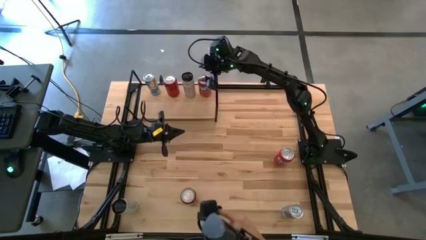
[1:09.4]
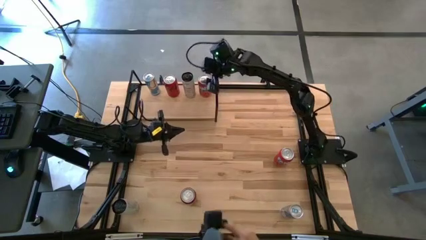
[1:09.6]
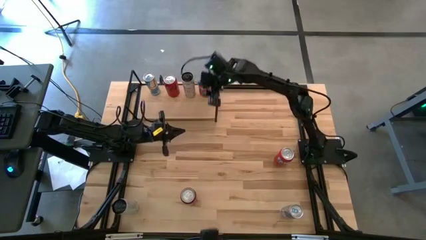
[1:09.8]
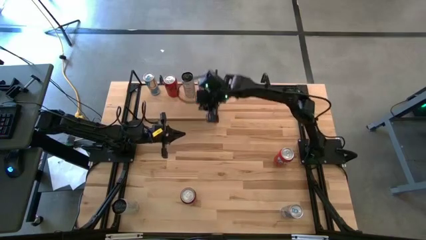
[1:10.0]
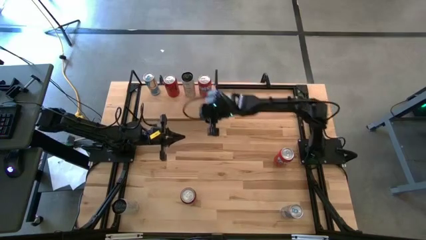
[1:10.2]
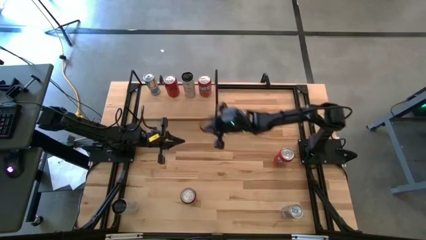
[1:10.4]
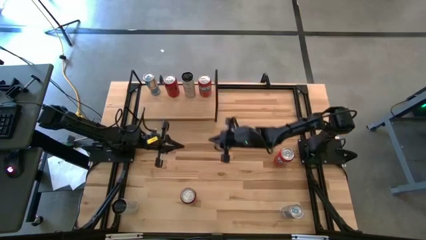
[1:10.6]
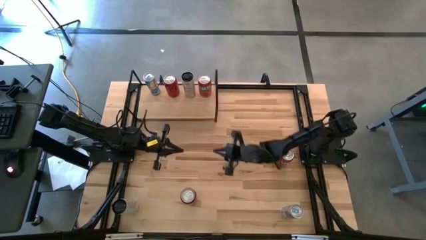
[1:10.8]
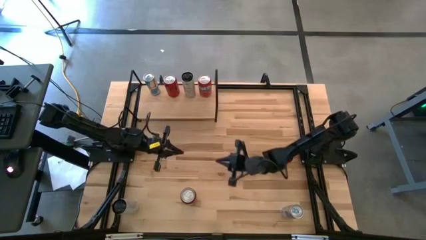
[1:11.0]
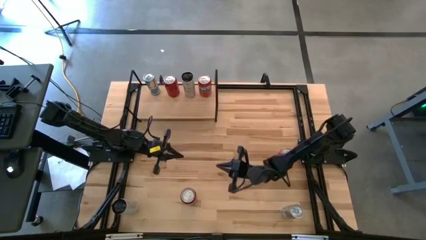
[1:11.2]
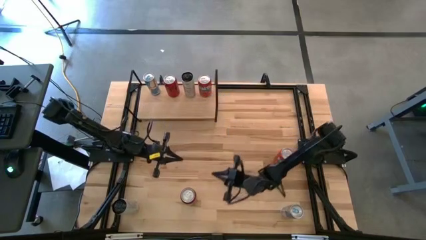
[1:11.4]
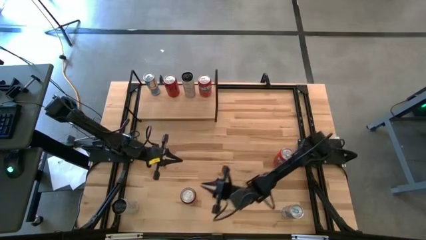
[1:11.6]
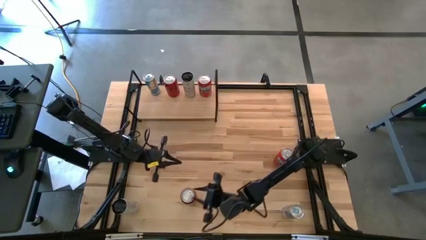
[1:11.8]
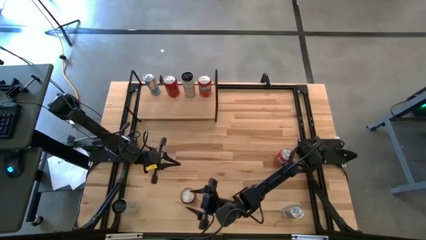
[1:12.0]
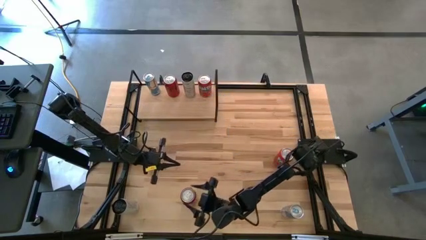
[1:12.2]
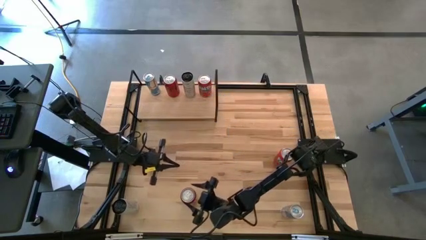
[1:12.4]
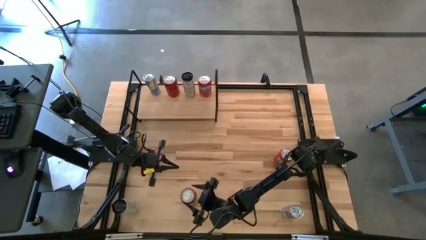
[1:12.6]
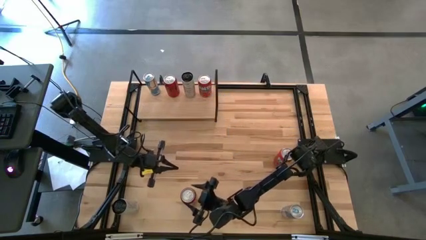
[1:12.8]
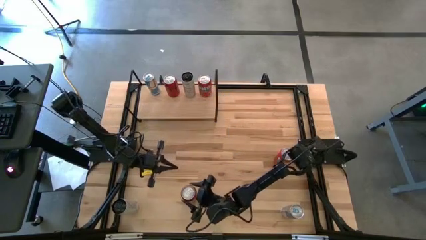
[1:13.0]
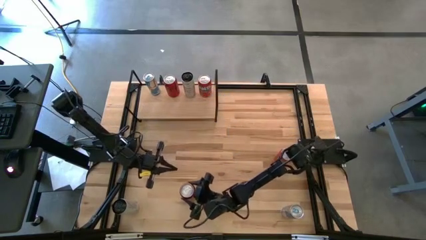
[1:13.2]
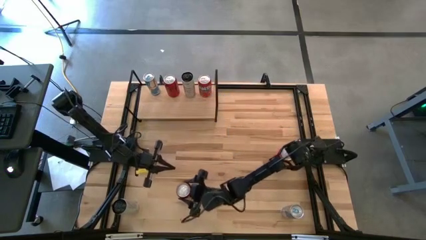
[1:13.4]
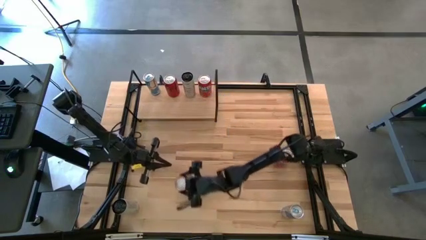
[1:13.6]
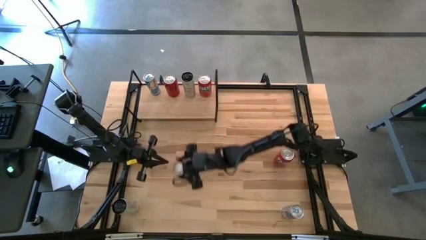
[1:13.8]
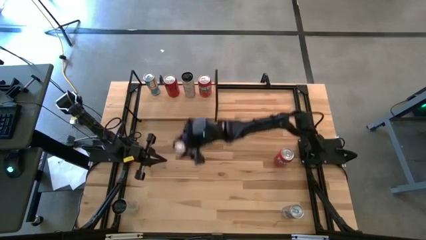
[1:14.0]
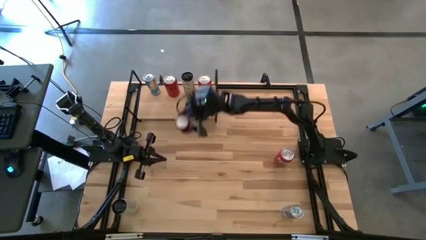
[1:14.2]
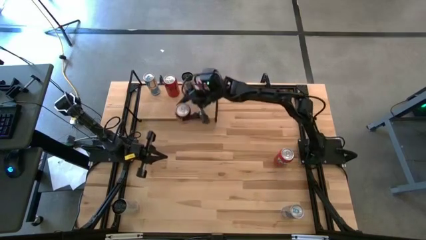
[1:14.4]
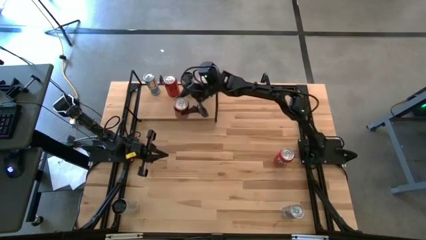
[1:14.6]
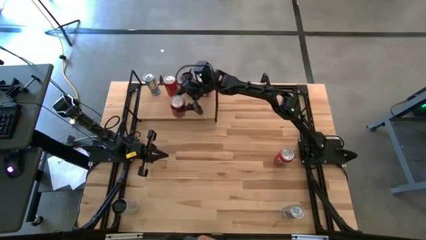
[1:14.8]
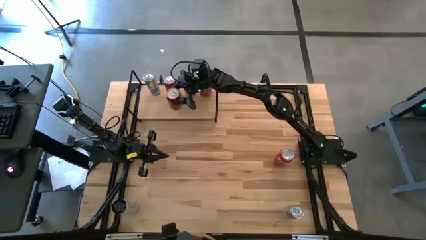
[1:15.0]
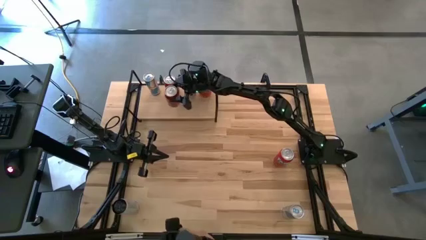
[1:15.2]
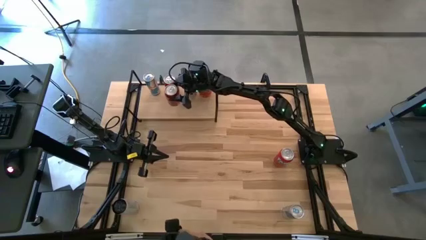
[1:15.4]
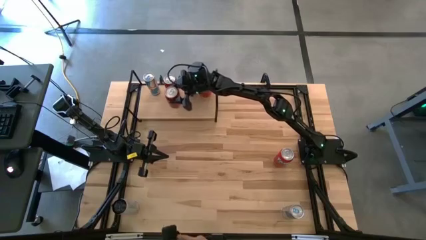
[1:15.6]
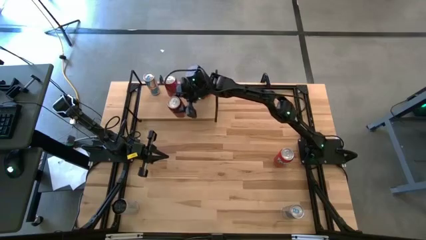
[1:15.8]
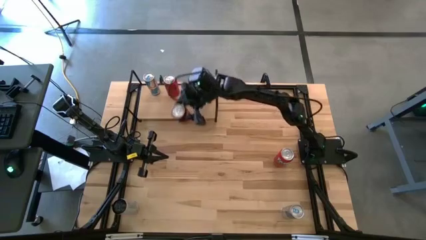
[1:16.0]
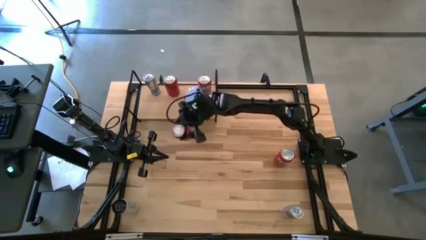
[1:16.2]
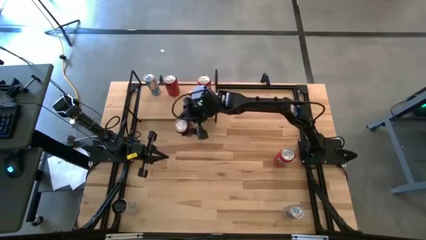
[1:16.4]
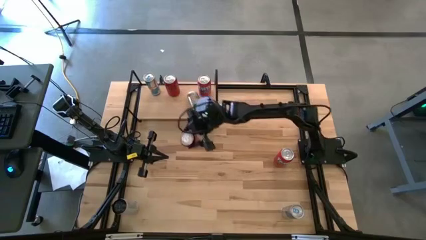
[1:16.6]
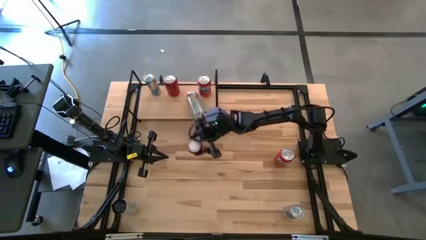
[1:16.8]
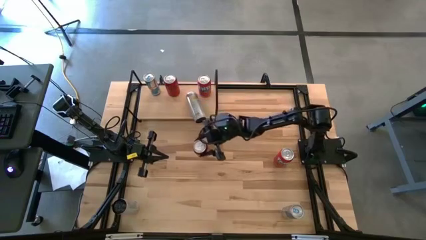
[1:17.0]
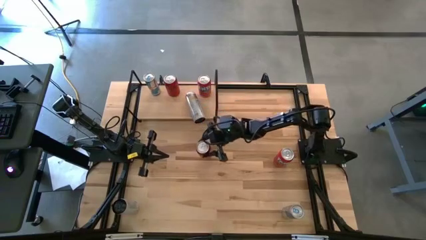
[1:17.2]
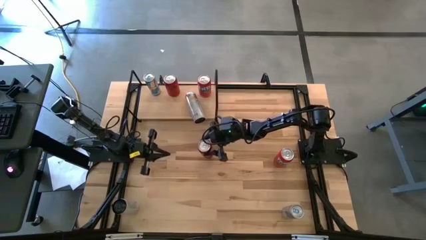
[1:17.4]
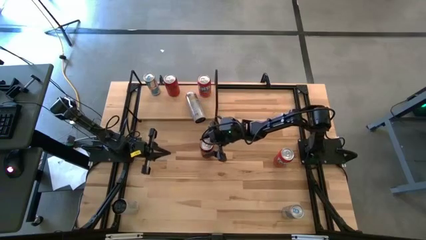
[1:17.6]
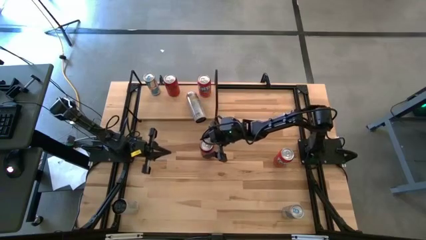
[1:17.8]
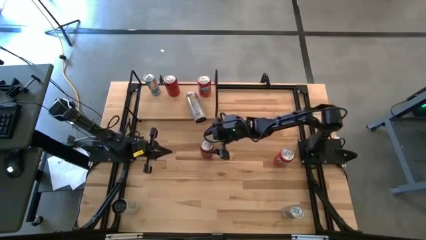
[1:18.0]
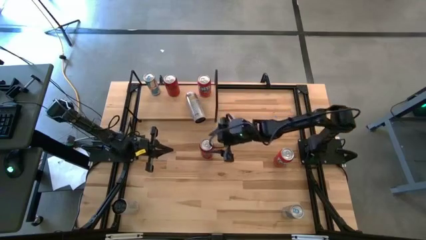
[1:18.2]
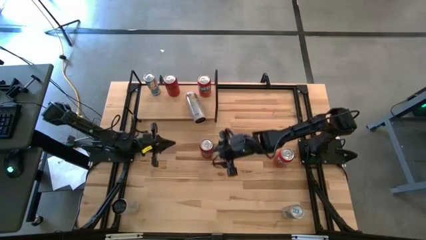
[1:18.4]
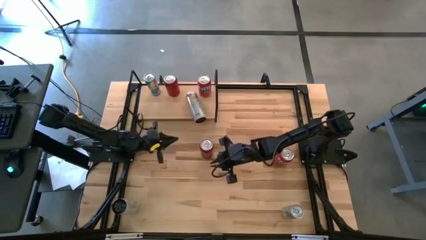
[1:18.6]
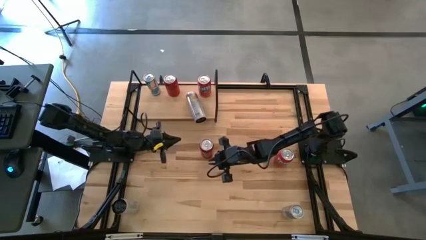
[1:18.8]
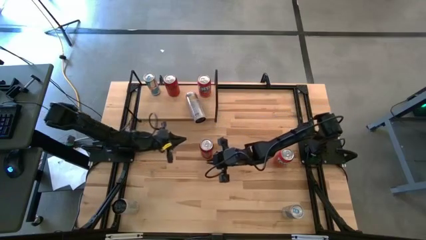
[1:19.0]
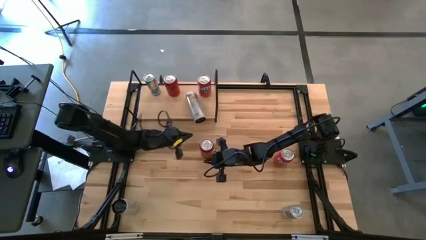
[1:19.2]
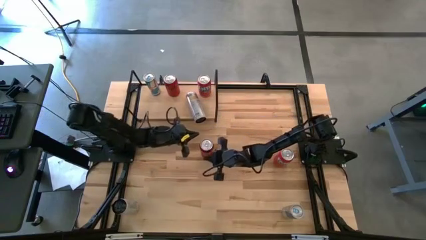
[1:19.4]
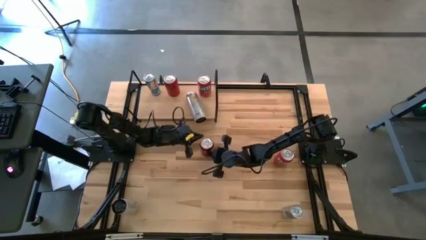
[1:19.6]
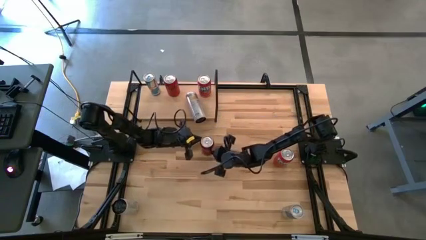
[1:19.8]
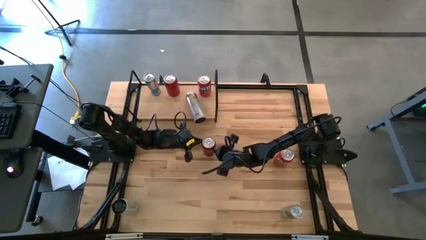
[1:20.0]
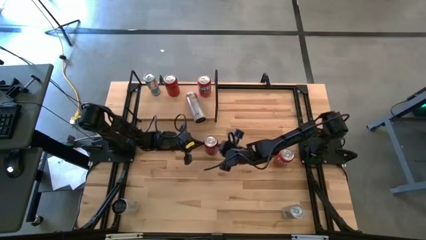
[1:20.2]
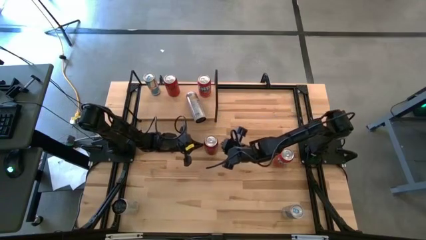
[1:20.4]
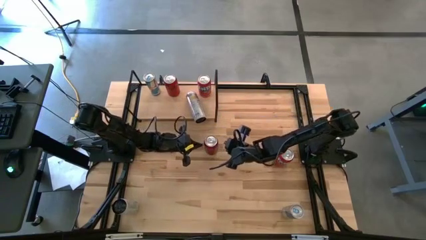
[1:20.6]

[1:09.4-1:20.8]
Task: Place canned beverage on shelf
Move the red soda can to the middle of the table

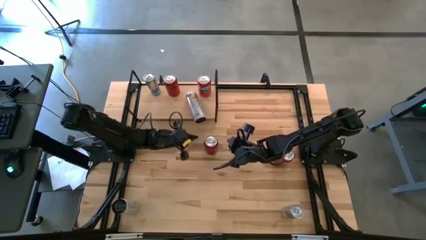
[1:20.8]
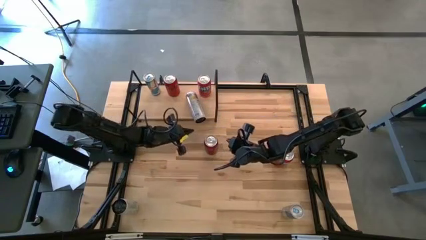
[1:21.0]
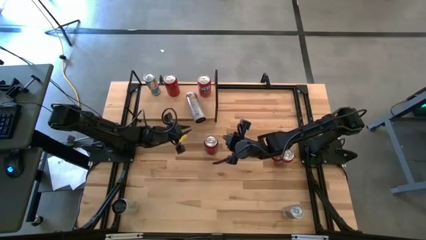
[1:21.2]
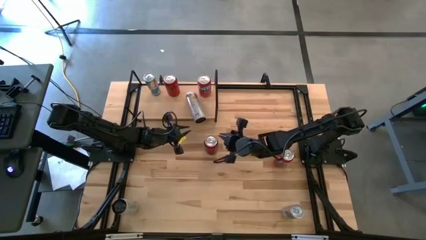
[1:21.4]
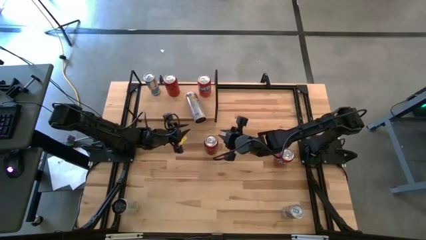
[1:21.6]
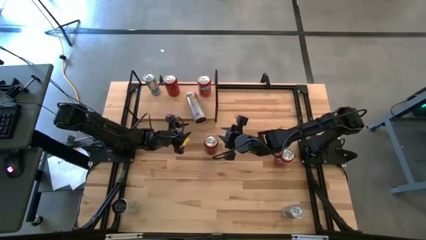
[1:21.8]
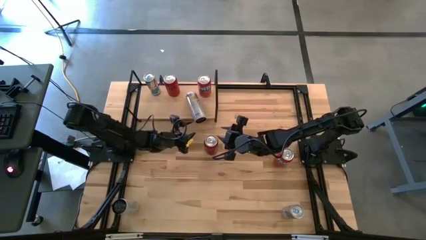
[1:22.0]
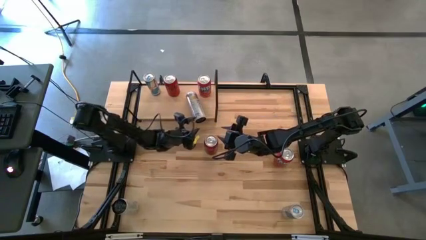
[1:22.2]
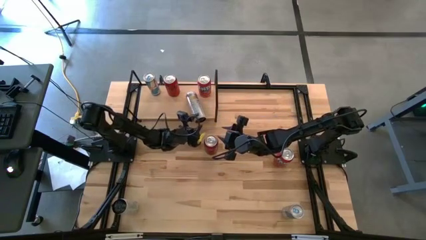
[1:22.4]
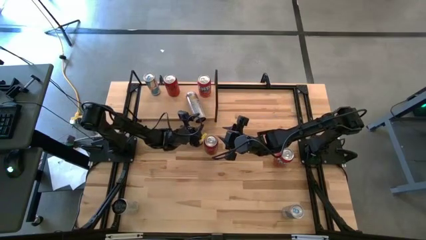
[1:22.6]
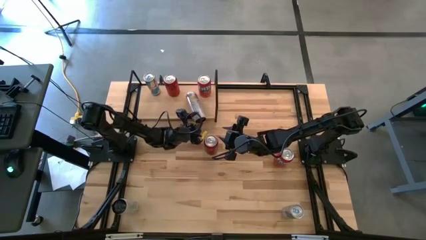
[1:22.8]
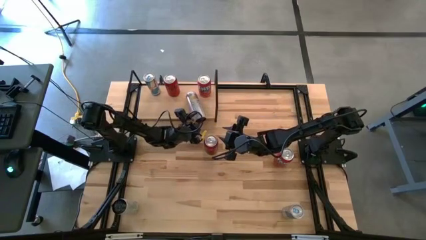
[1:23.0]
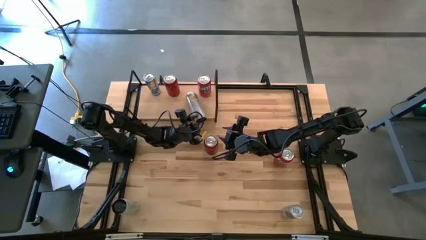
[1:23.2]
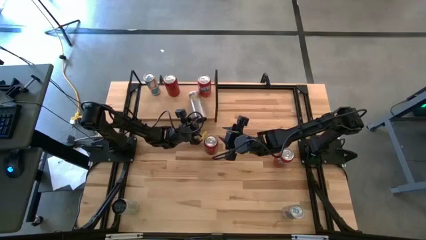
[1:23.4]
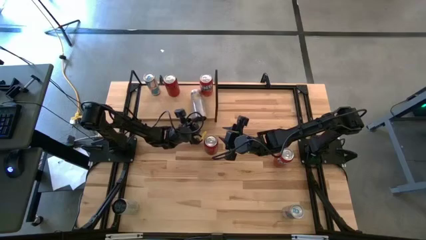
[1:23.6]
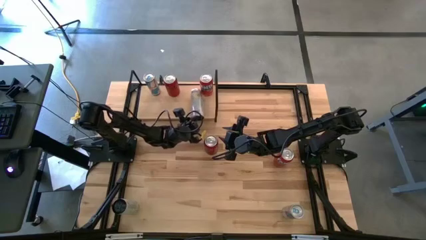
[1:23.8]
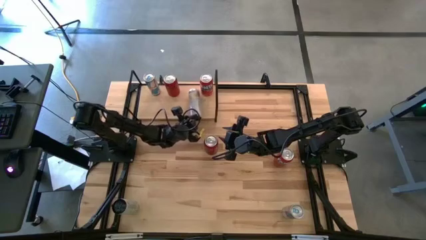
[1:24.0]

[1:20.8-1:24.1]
Adjust the white yellow soda can on the shelf
